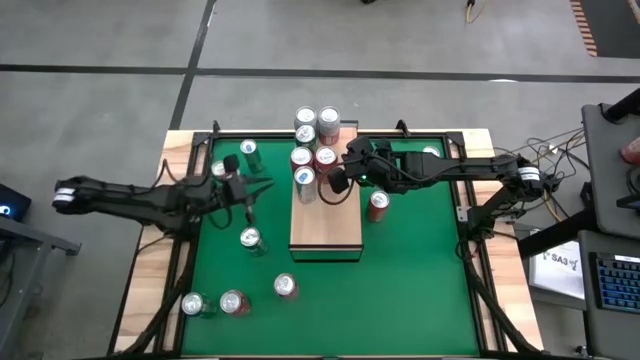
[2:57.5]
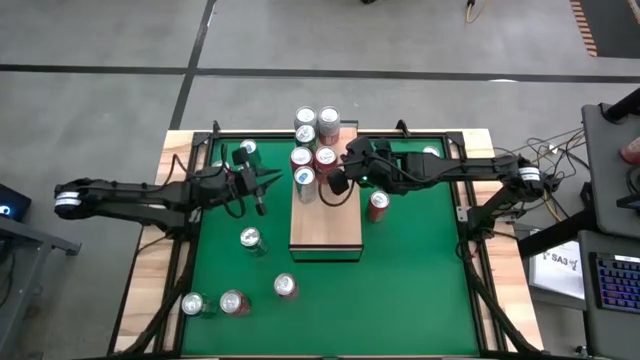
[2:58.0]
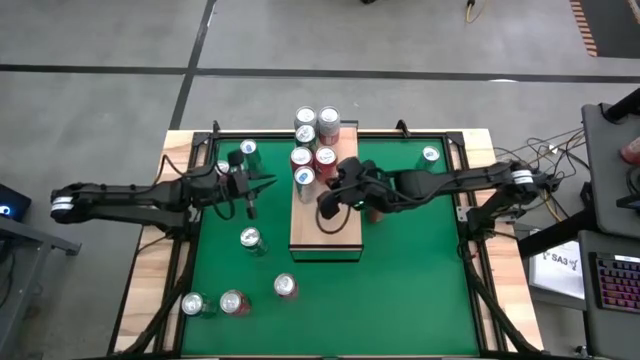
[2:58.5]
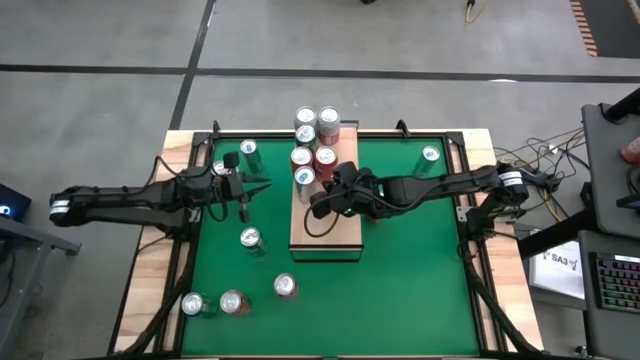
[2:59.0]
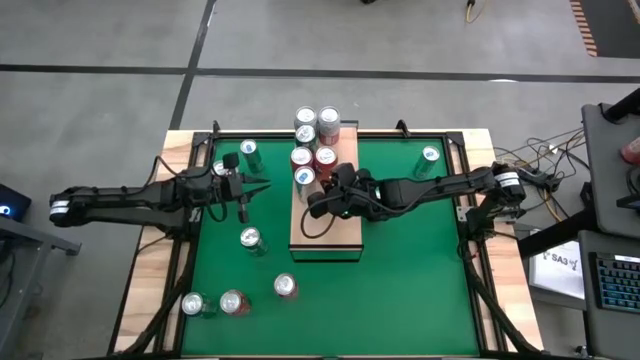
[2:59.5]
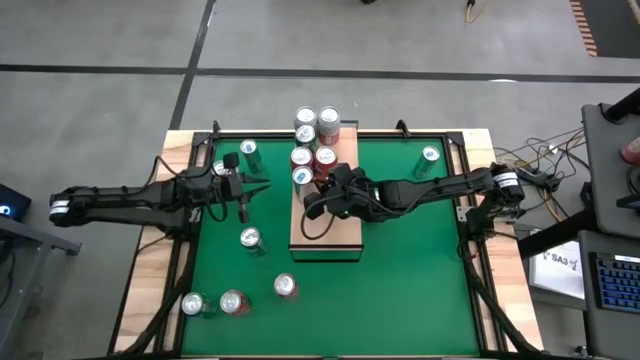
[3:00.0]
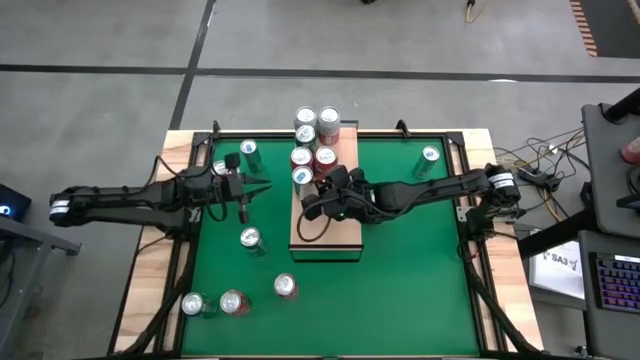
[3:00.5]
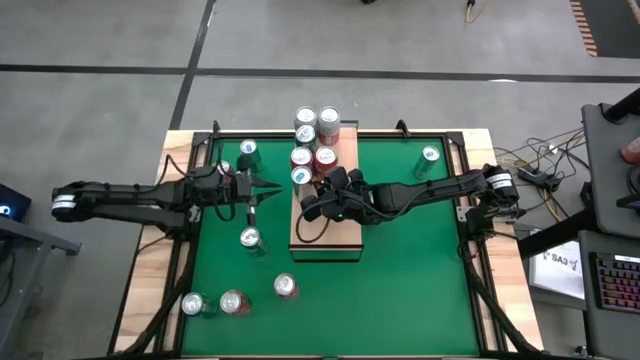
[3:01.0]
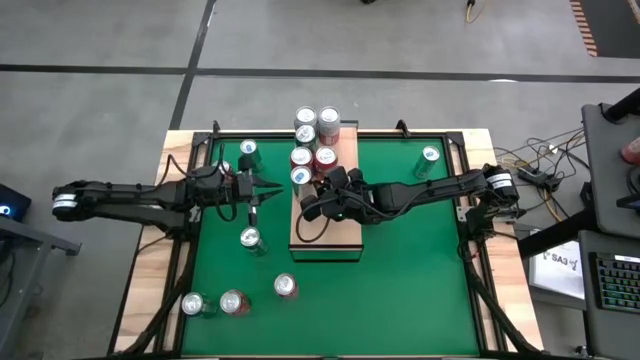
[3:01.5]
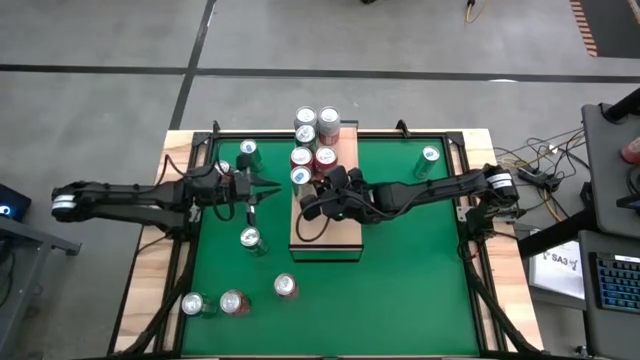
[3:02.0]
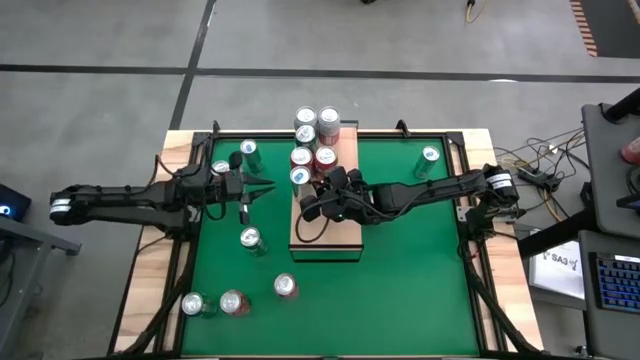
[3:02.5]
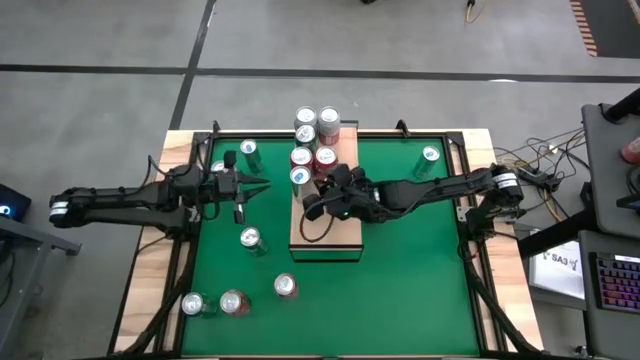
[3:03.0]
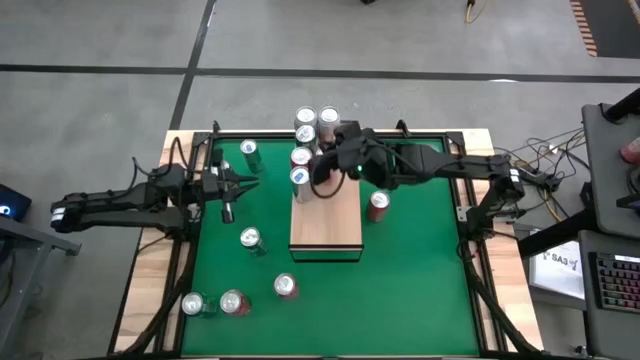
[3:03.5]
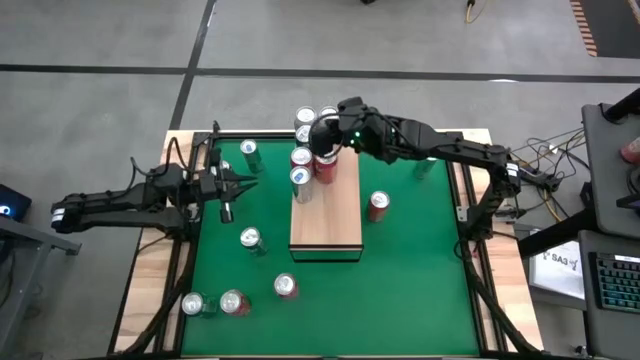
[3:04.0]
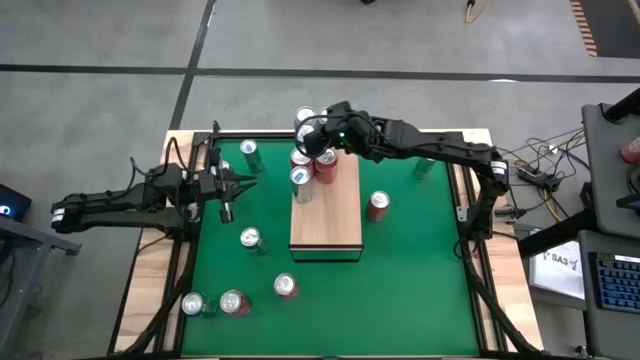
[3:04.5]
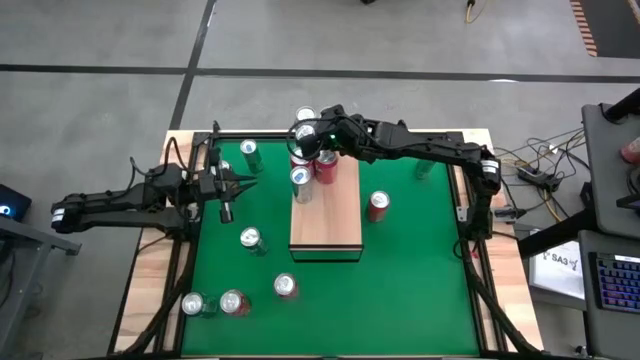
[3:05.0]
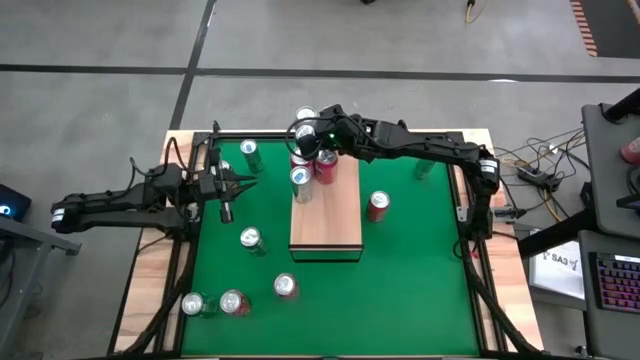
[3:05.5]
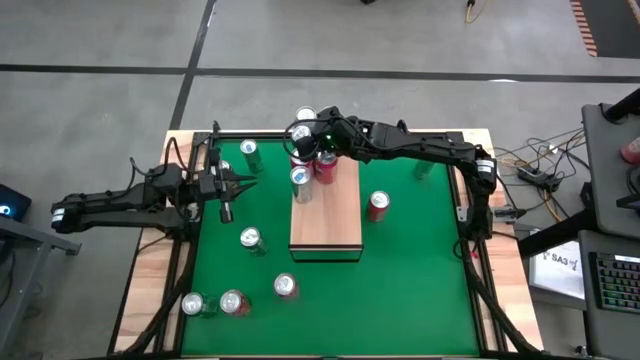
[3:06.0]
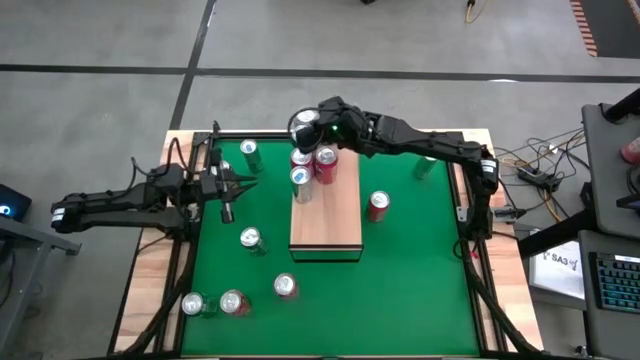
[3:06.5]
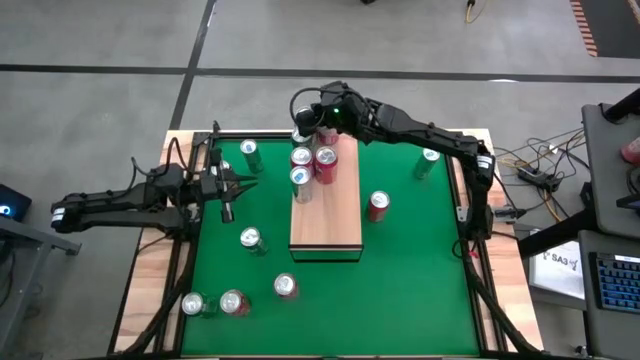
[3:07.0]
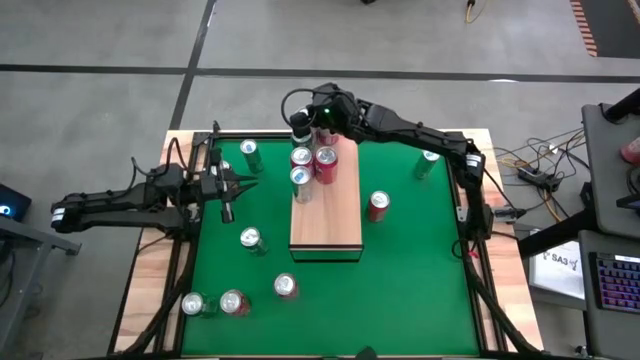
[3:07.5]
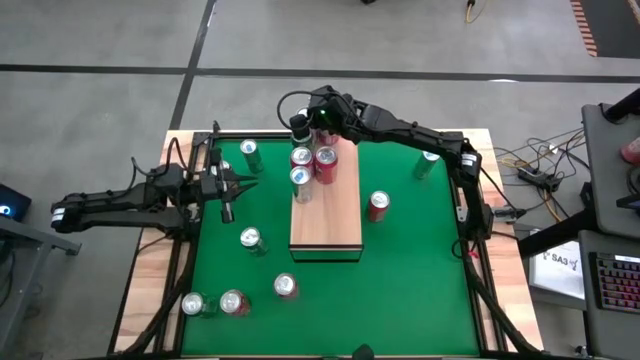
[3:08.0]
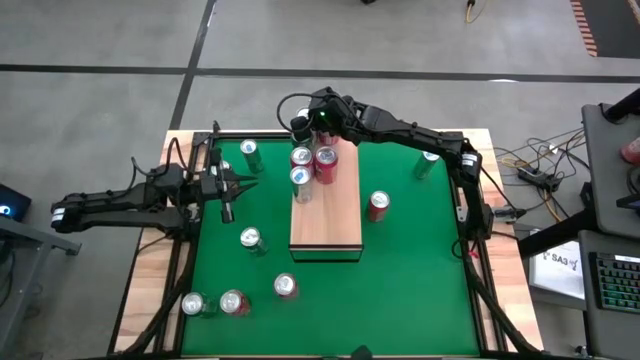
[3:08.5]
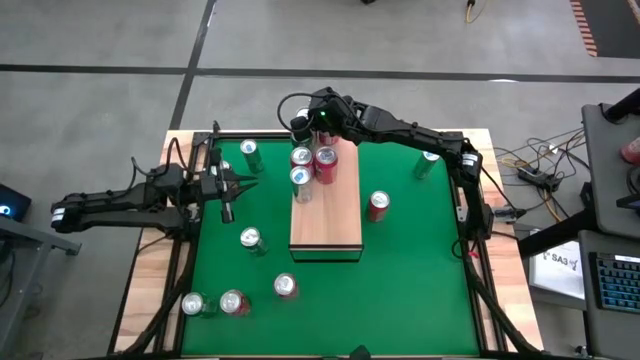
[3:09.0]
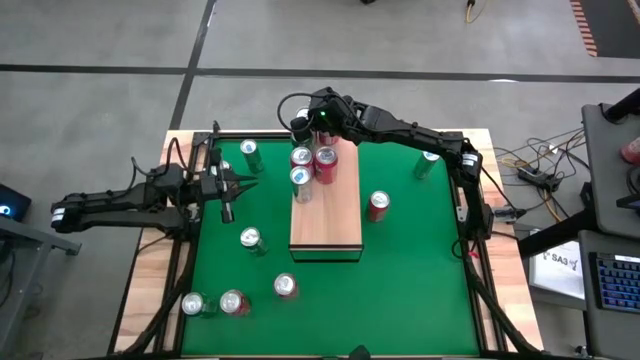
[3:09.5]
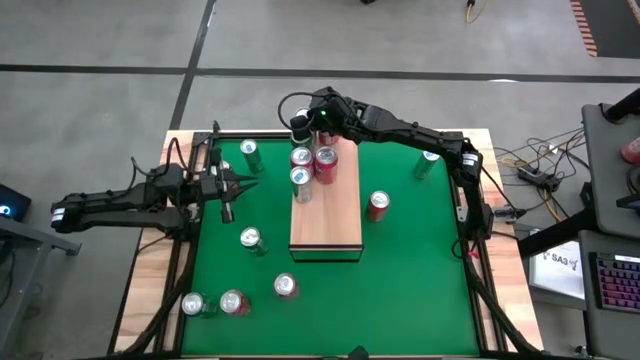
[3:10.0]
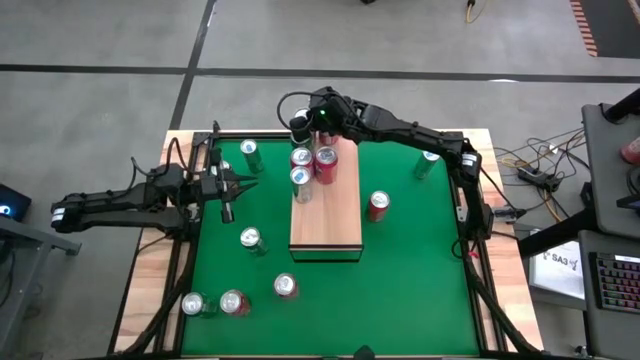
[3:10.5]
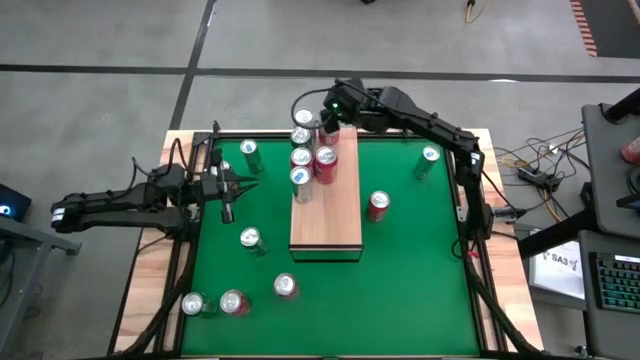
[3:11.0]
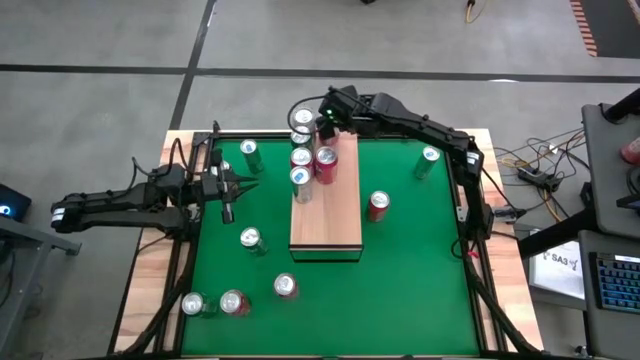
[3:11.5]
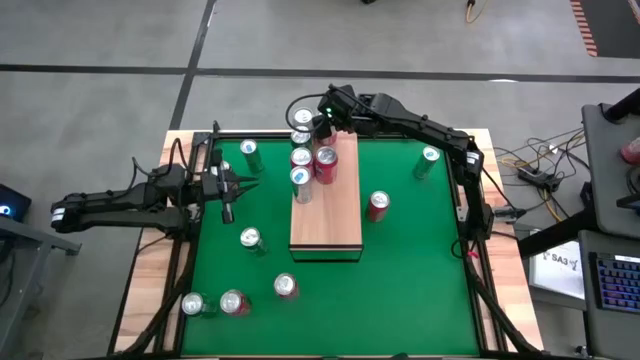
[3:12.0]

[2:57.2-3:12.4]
Task: Place canned beverage on shelf
Adjust the cans on the shelf

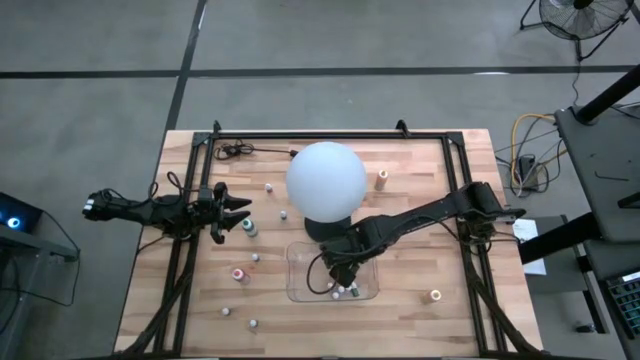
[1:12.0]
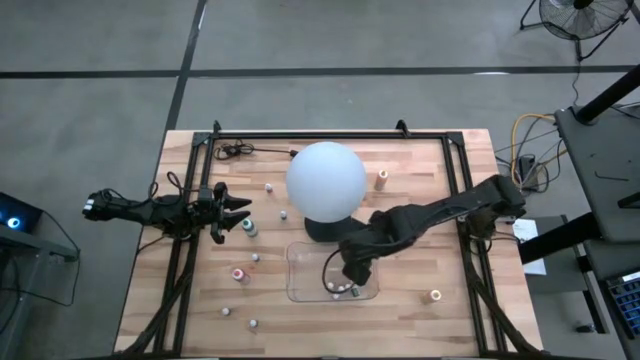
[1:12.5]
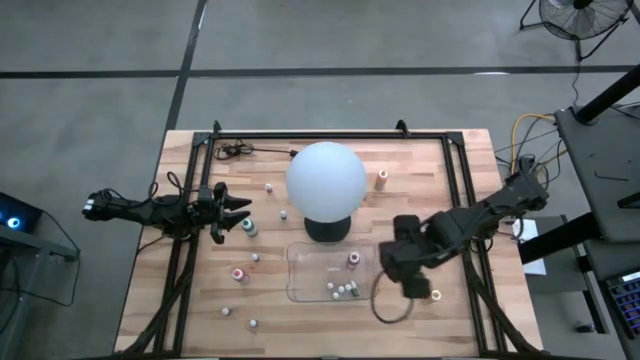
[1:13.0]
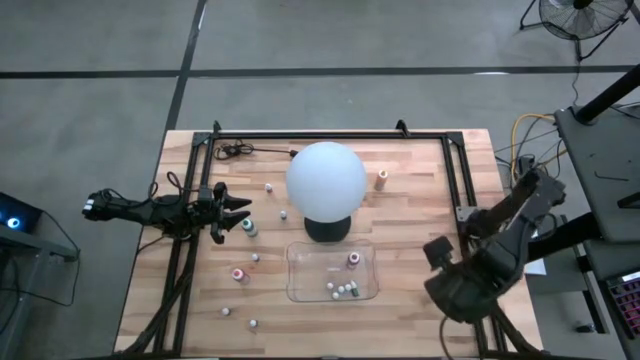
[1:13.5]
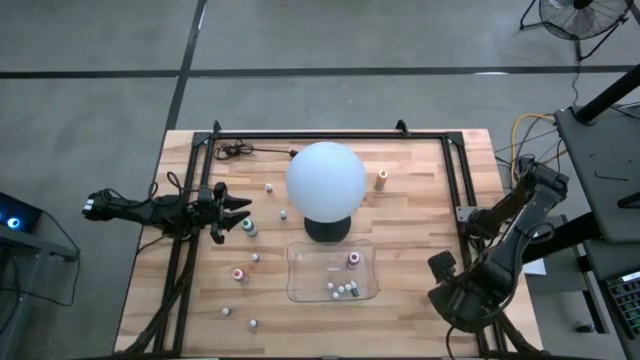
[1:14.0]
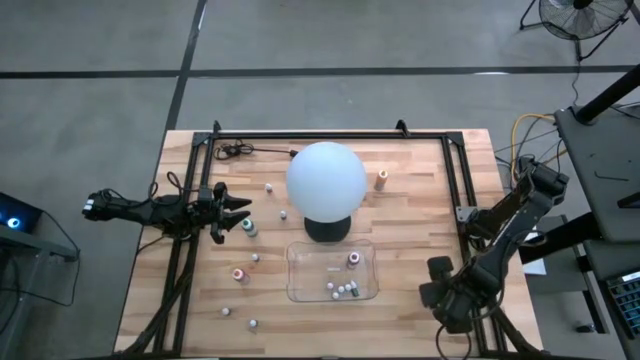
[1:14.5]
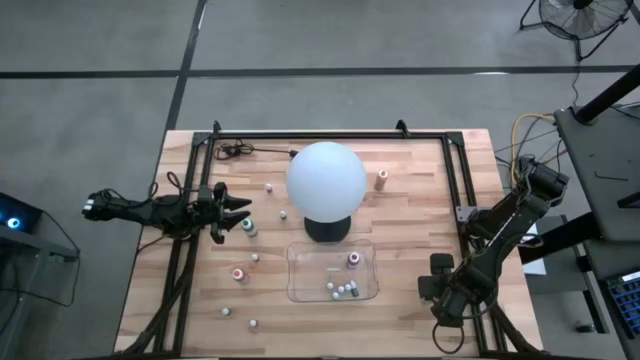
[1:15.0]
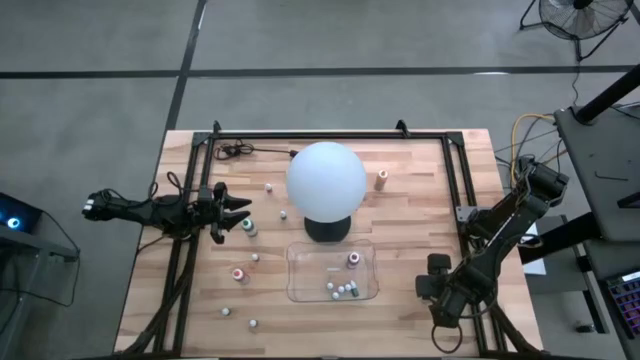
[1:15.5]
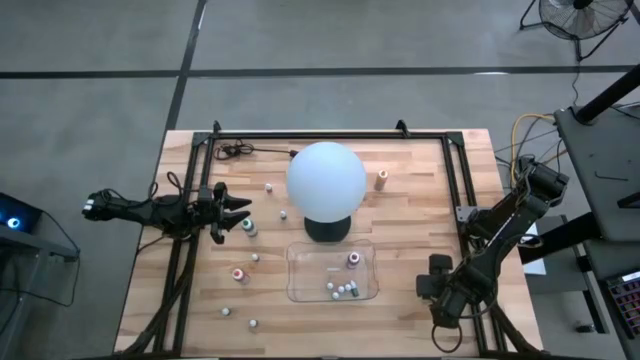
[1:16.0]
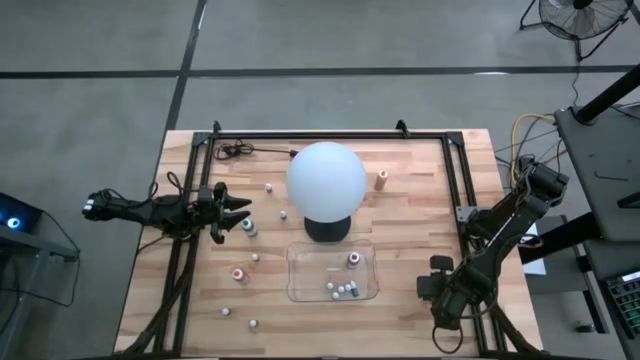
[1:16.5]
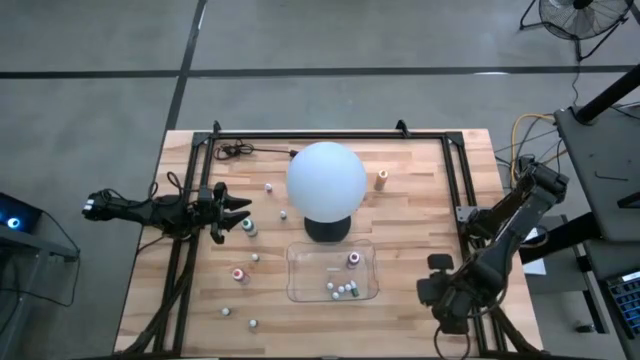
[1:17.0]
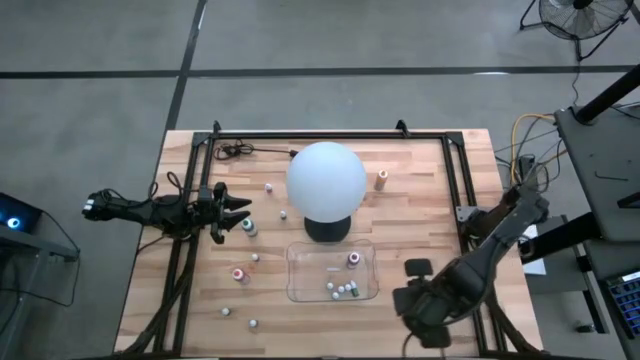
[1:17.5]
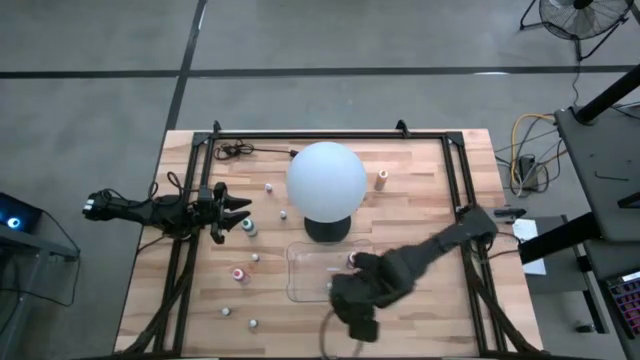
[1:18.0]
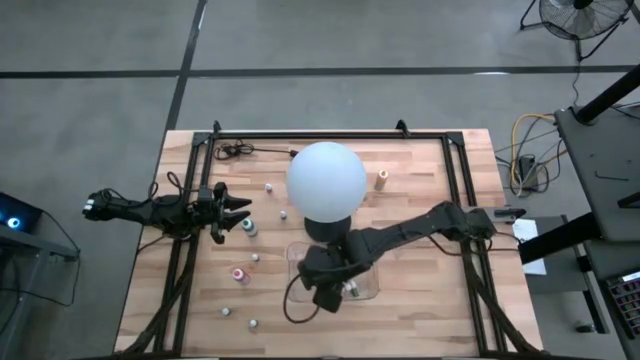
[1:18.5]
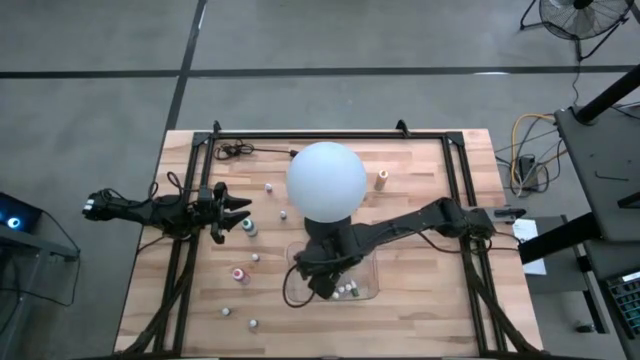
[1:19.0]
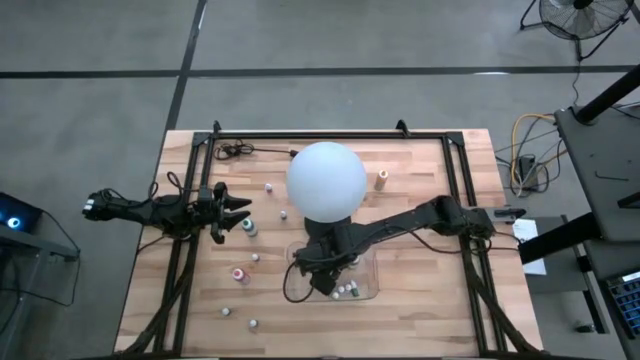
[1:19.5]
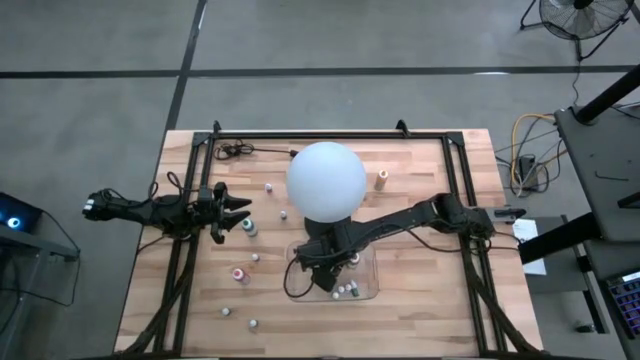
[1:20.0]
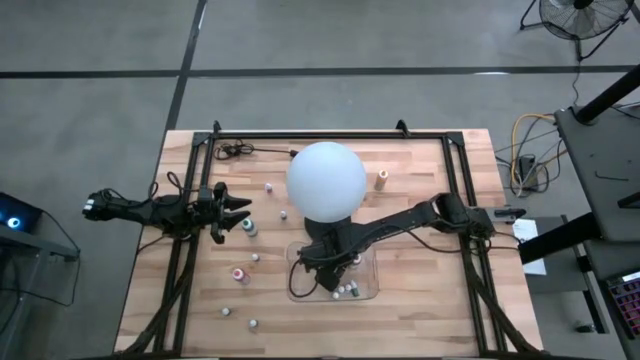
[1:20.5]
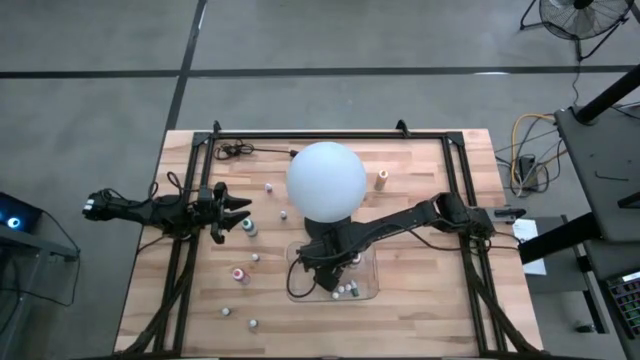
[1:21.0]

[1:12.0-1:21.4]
Task: Pick & Place food coloring
Put the bottom big yellow food coloring bottle into the transparent bin
